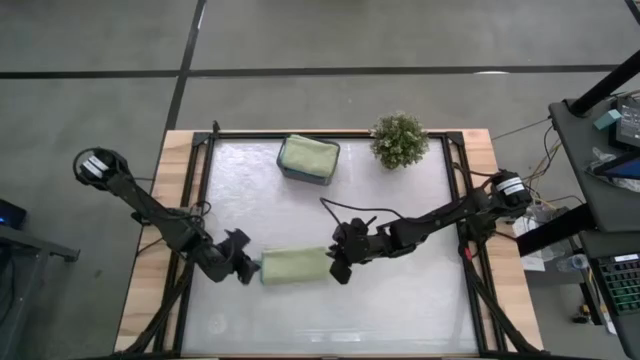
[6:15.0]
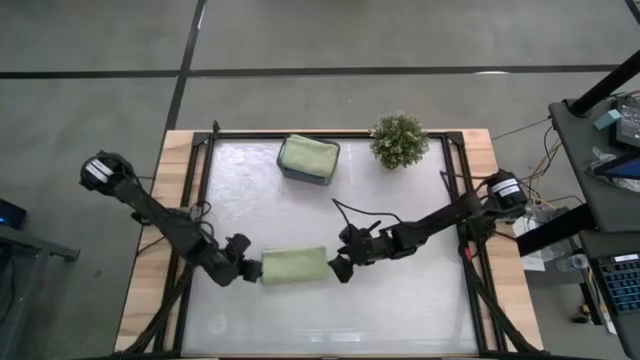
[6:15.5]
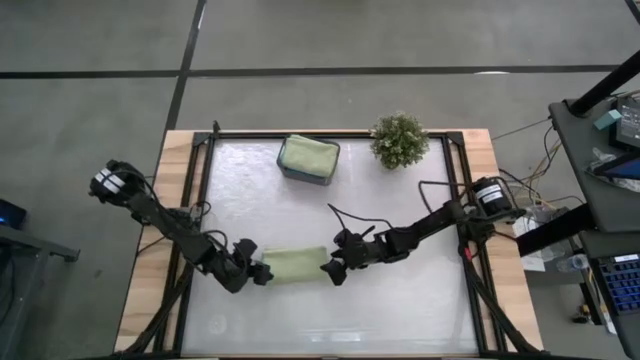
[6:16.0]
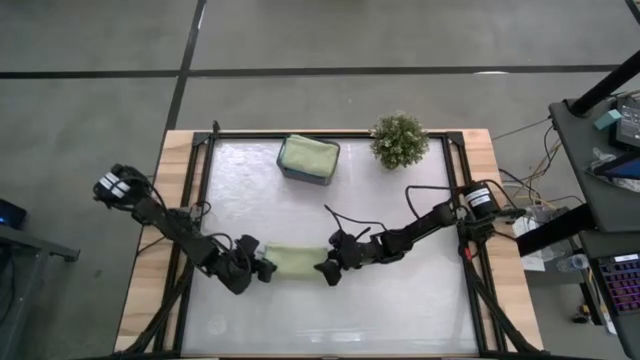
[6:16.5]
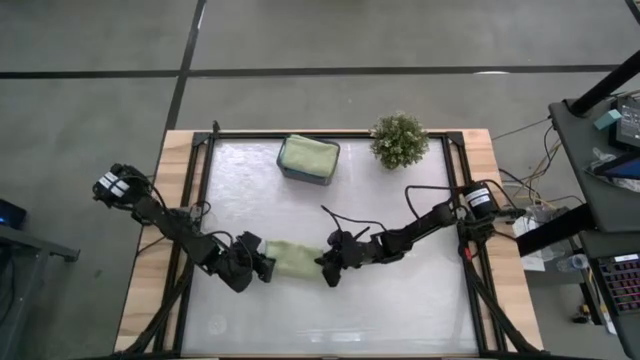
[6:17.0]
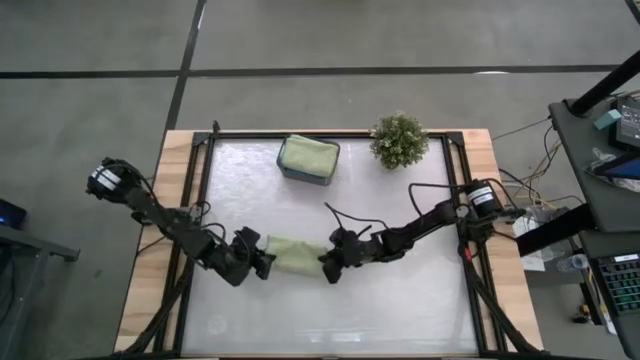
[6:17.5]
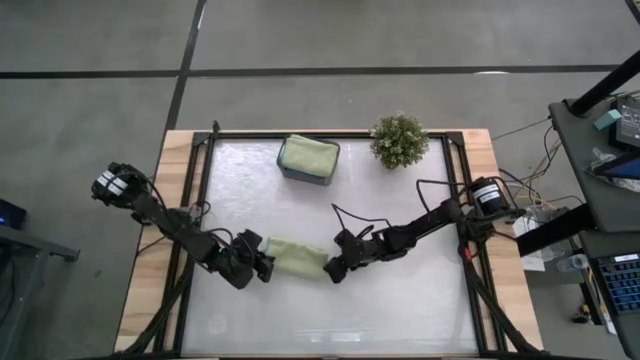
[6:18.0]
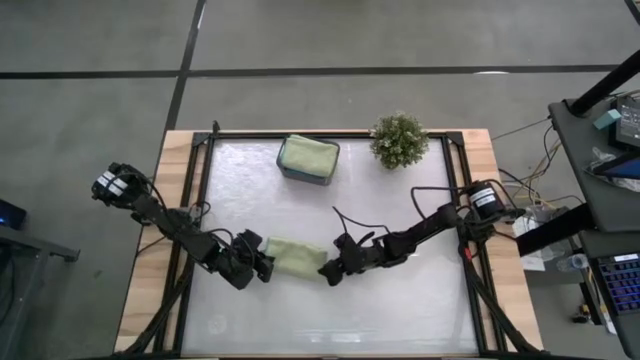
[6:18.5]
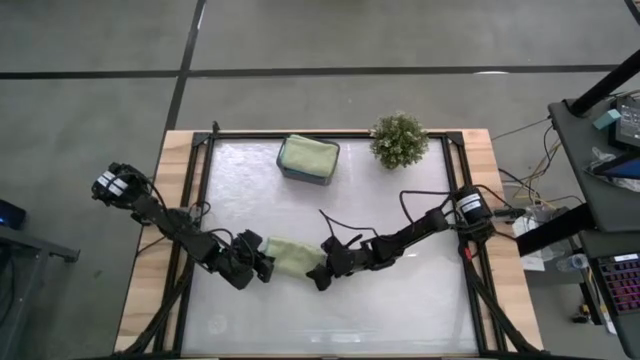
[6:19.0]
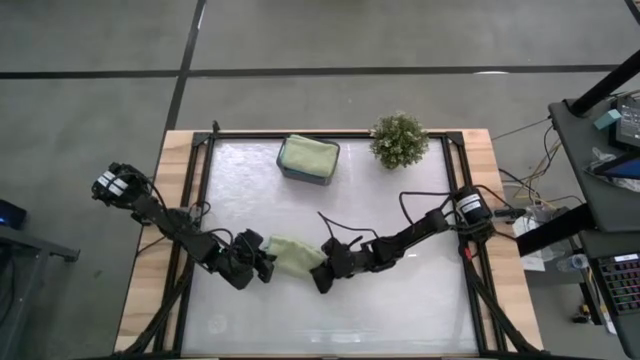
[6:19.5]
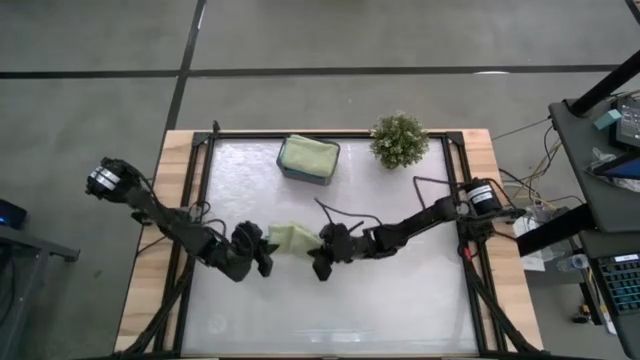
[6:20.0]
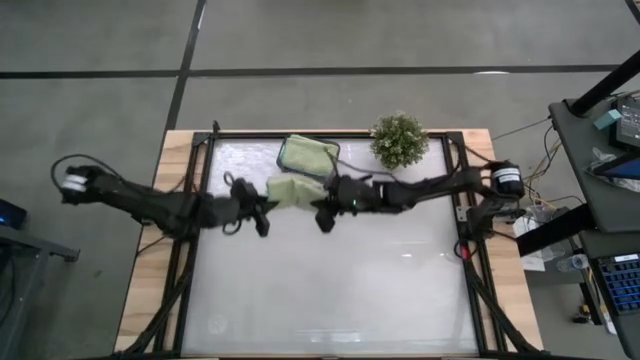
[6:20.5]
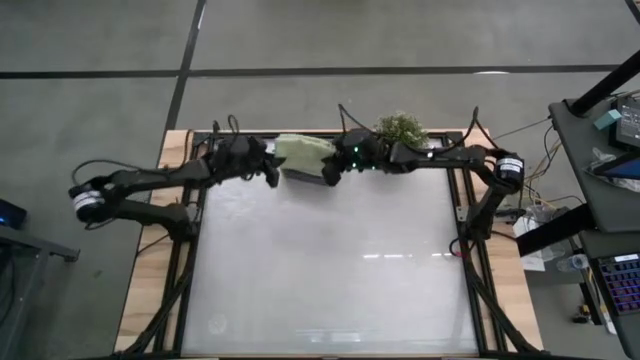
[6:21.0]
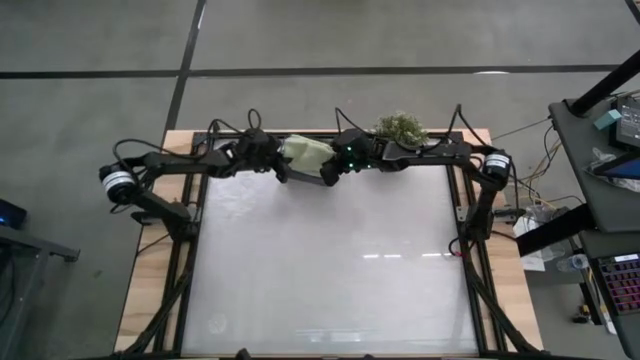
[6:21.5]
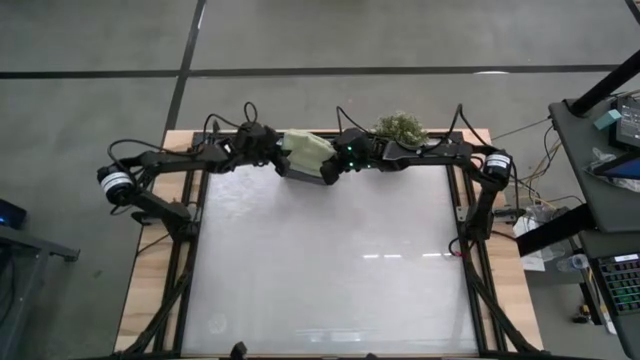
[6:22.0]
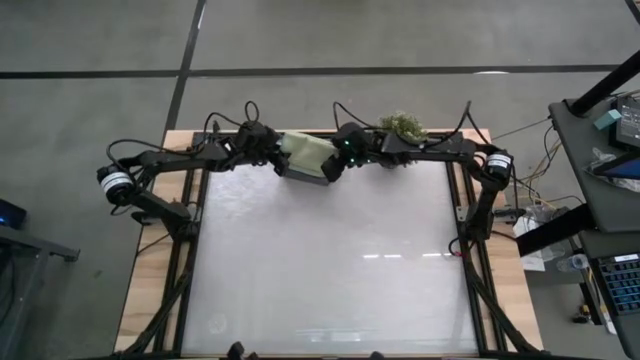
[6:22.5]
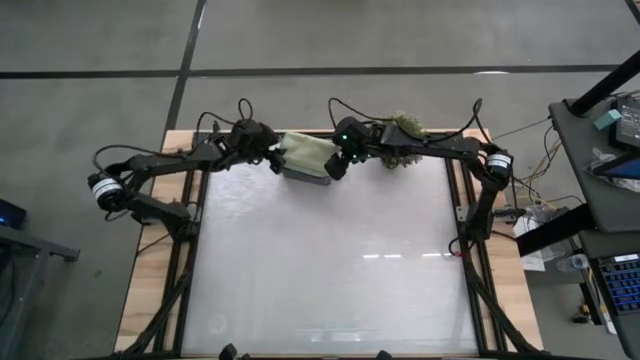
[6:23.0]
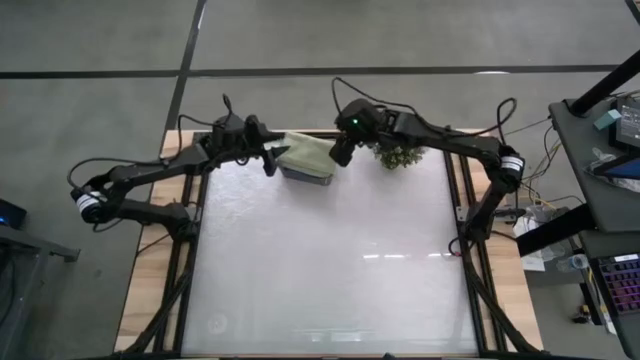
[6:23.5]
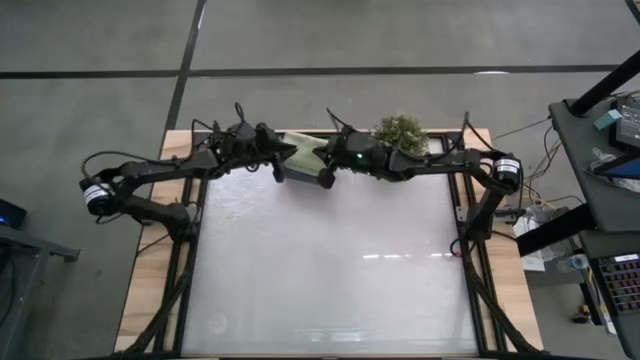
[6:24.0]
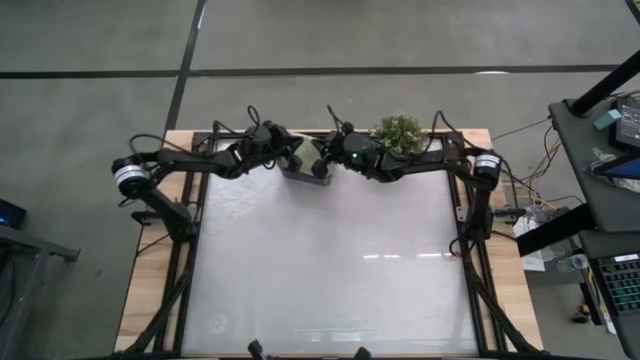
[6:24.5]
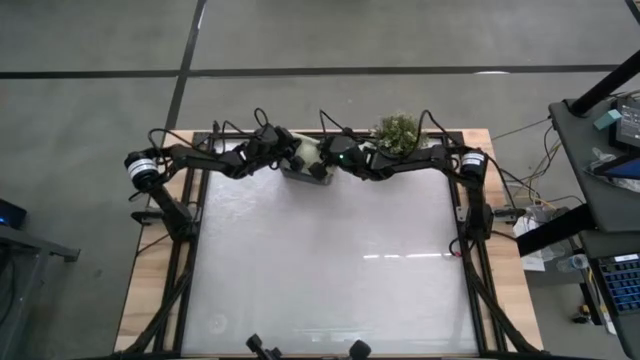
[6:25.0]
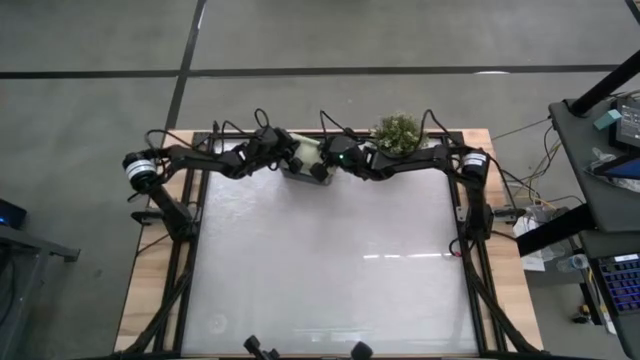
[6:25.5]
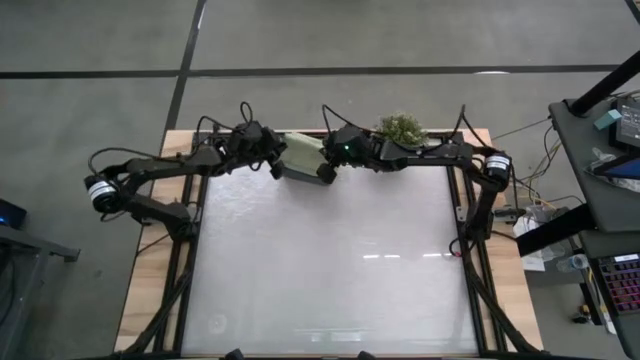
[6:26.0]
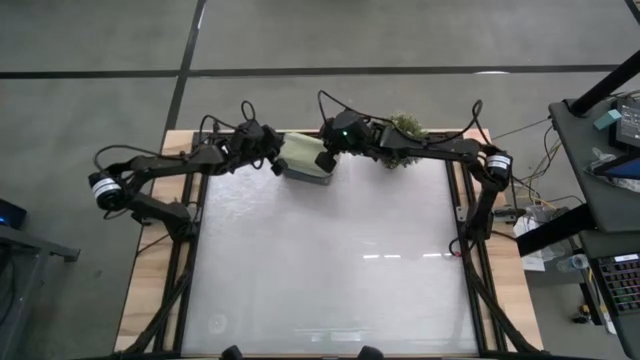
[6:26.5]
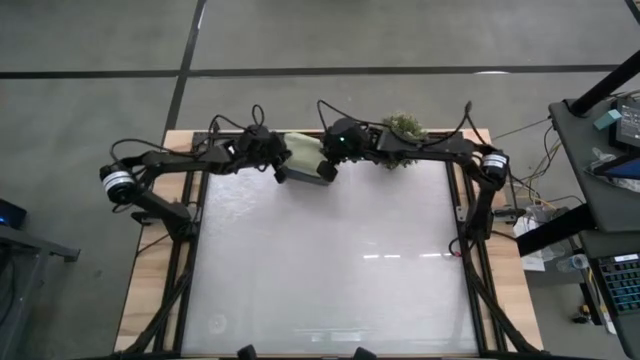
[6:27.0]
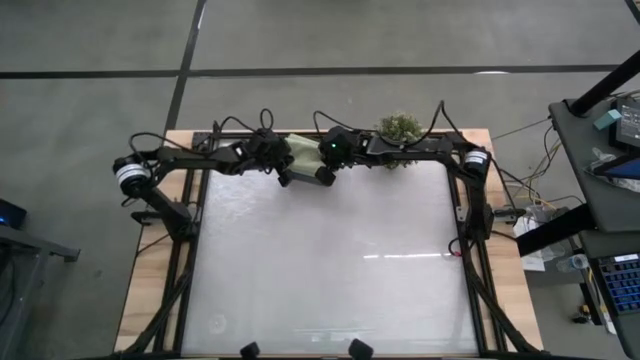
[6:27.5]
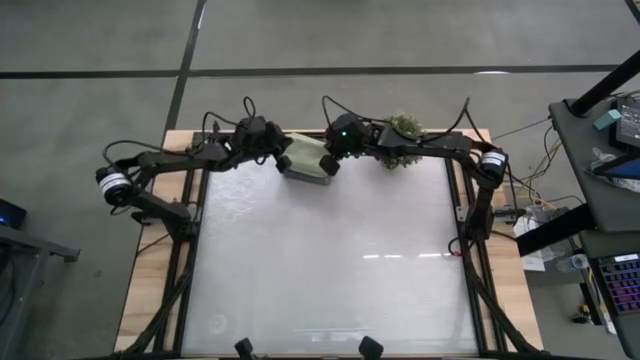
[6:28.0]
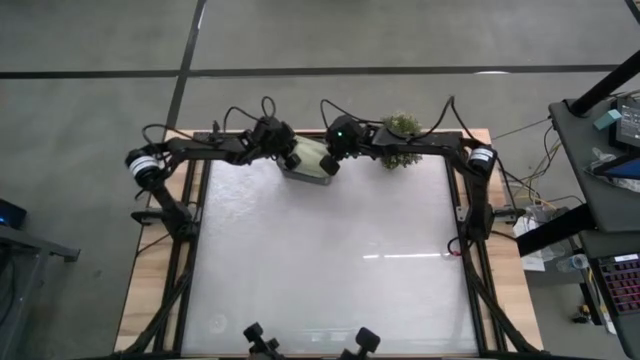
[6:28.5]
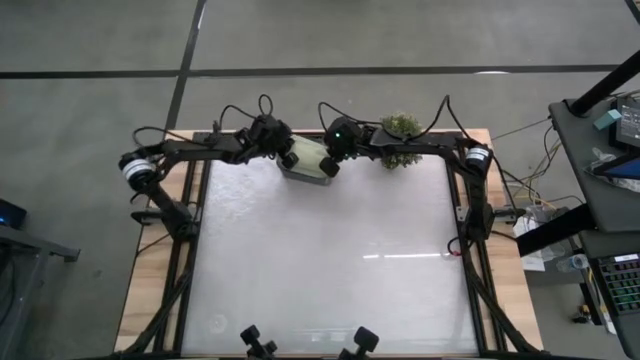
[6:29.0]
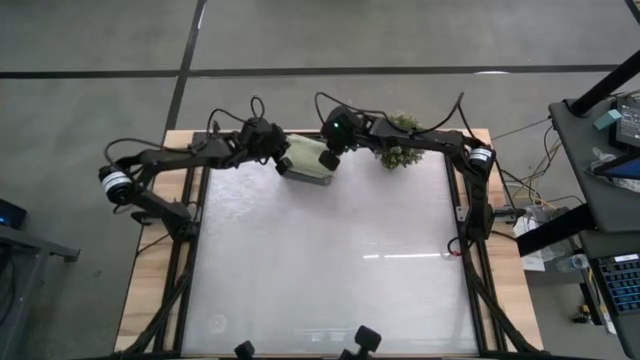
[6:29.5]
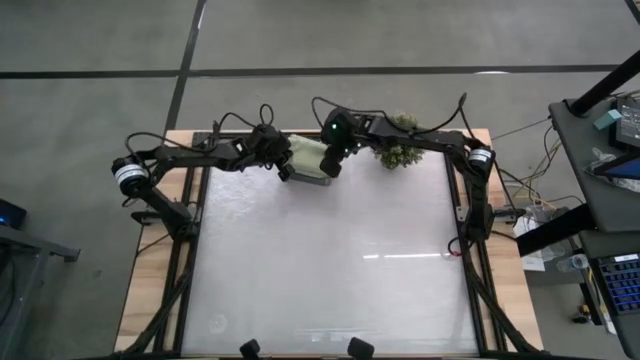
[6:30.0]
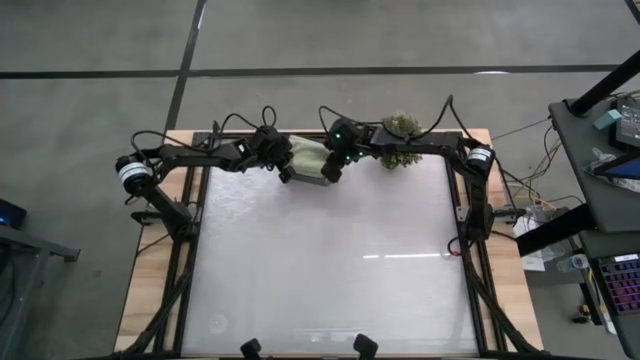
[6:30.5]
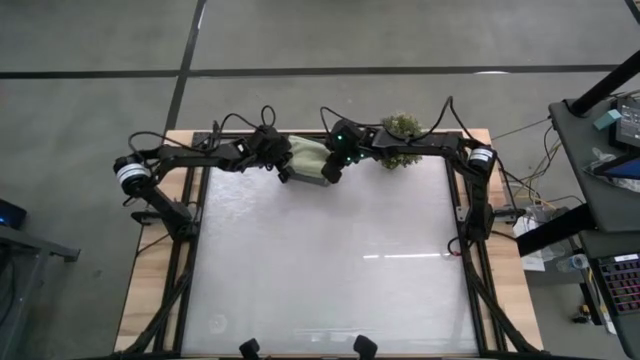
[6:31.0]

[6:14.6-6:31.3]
Task: Fold microfiber towels
Put the folded green microfiber towel into the black bin

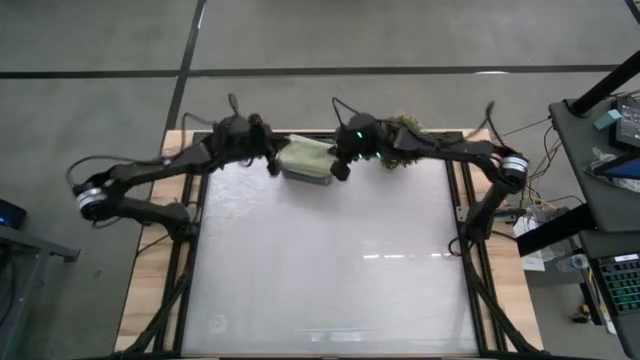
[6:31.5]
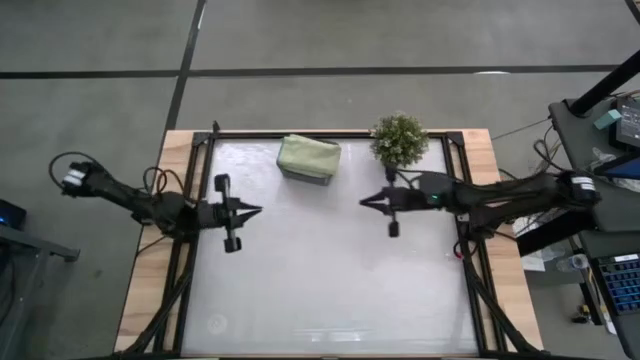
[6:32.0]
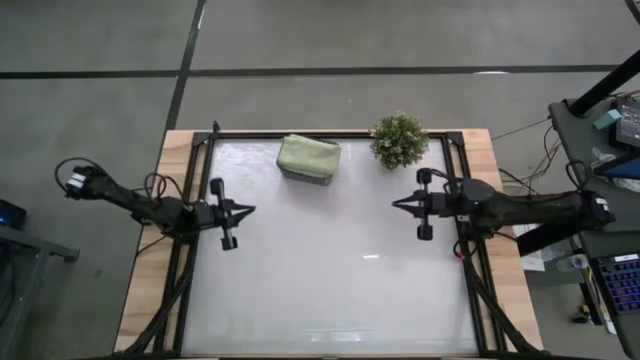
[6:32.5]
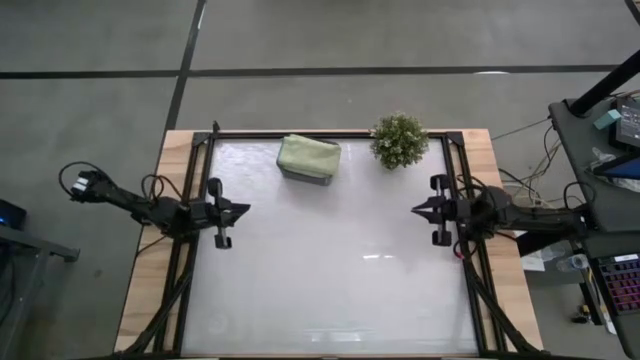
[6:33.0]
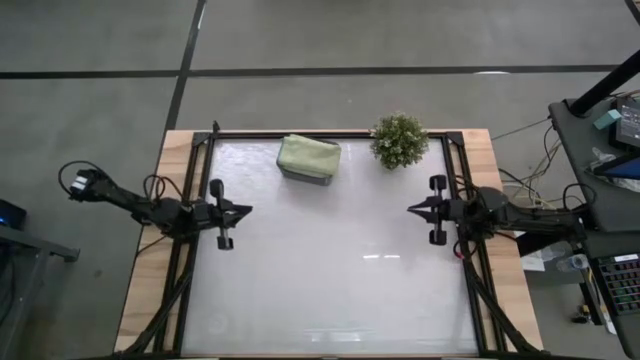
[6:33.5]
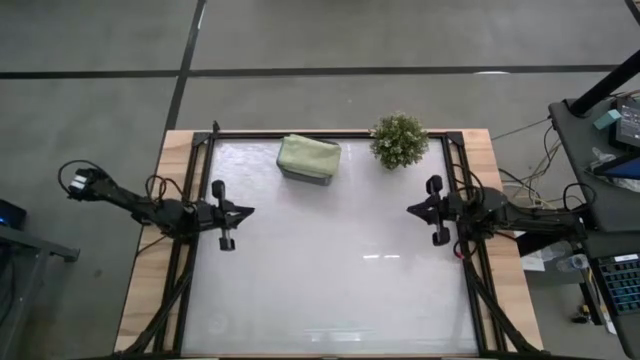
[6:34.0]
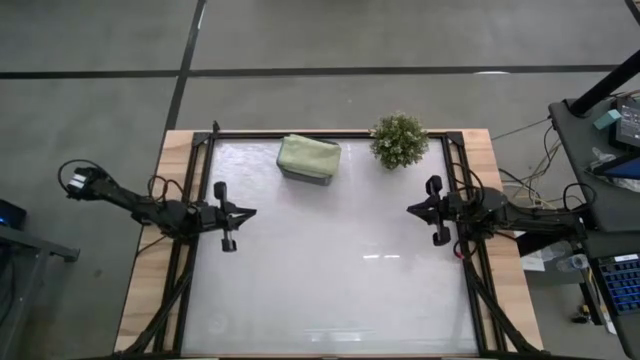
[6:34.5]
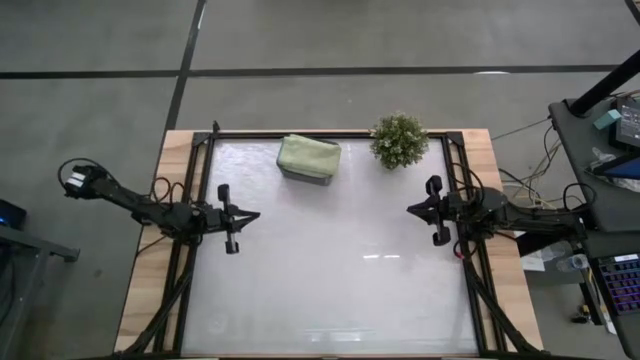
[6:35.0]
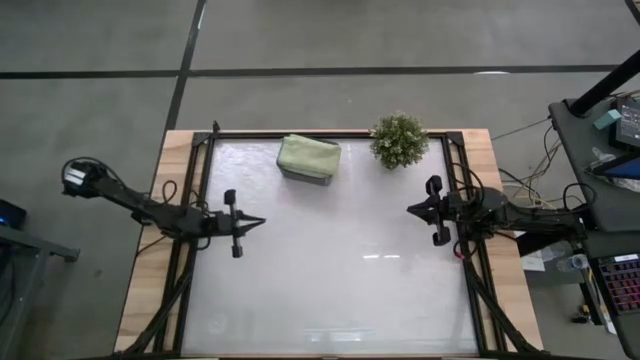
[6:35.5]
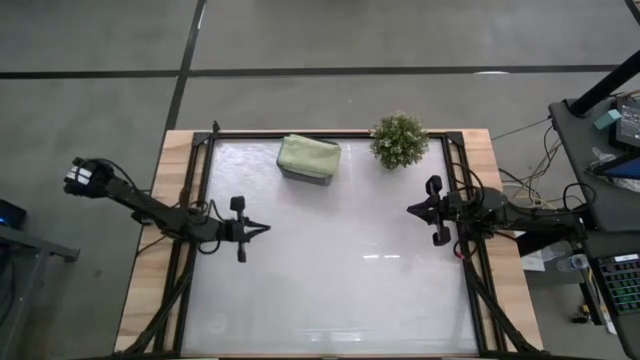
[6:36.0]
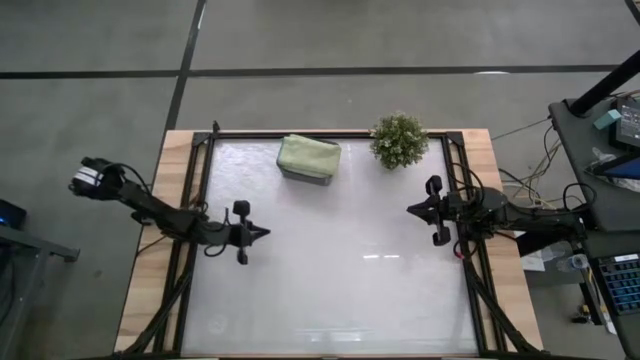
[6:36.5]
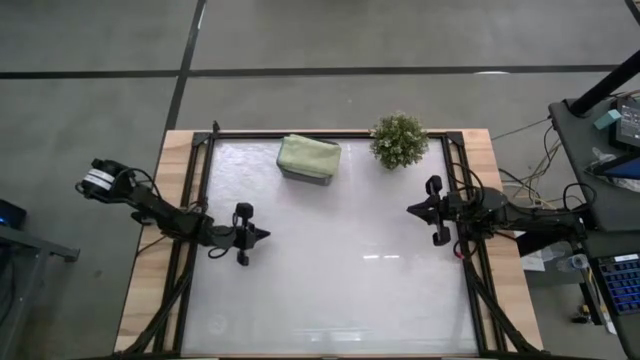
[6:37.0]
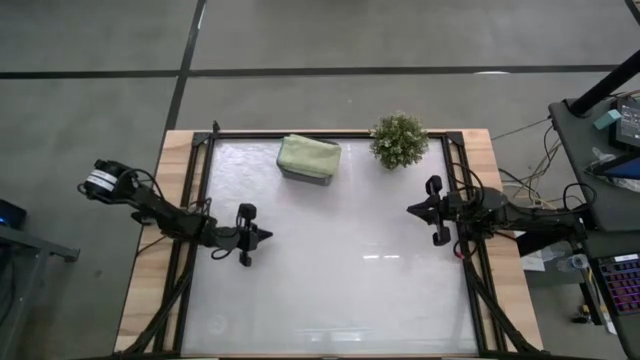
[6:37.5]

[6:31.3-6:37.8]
Return to Home Position
